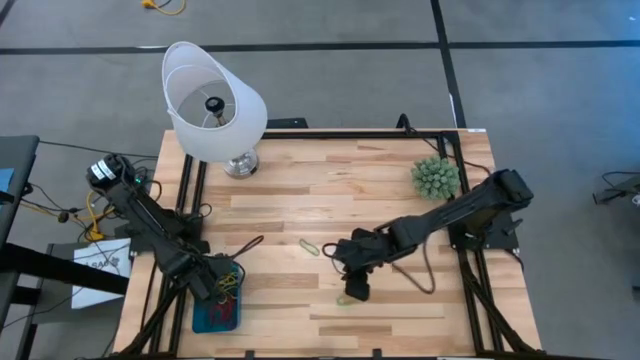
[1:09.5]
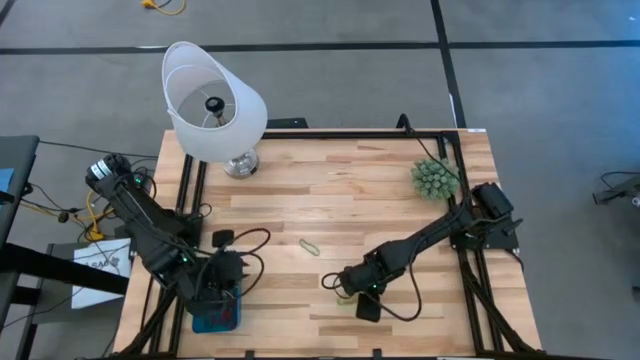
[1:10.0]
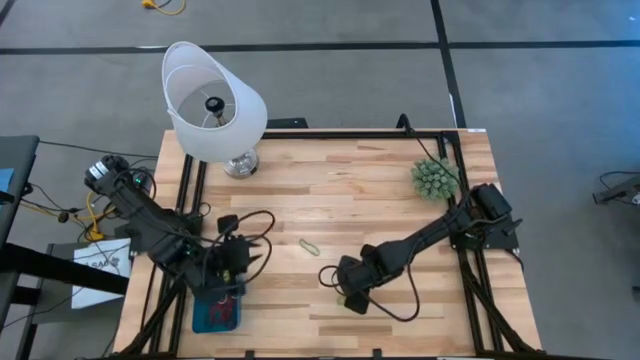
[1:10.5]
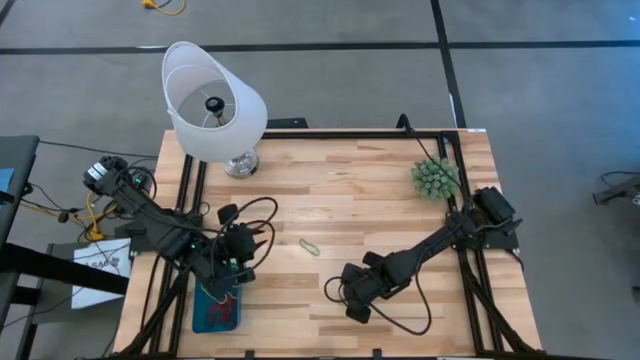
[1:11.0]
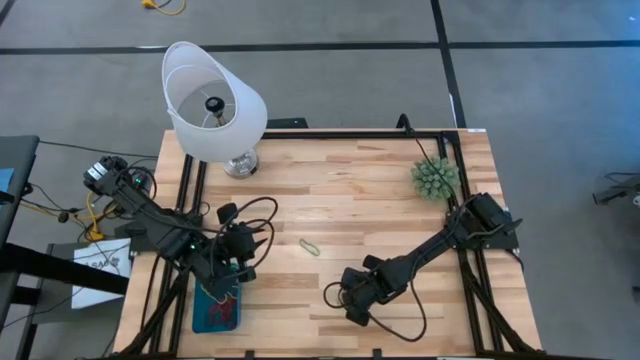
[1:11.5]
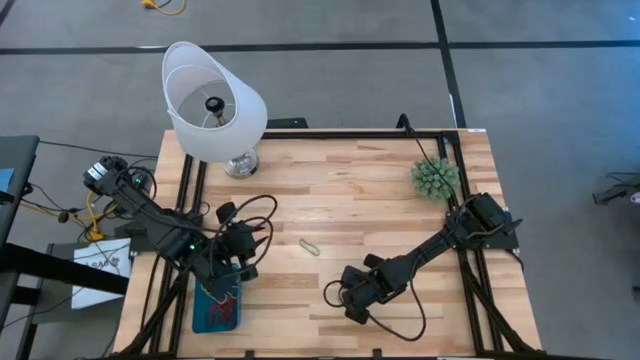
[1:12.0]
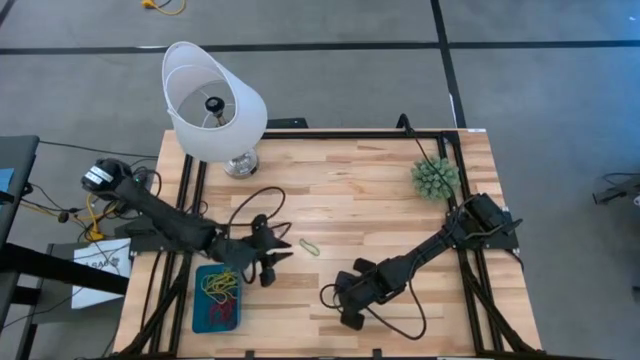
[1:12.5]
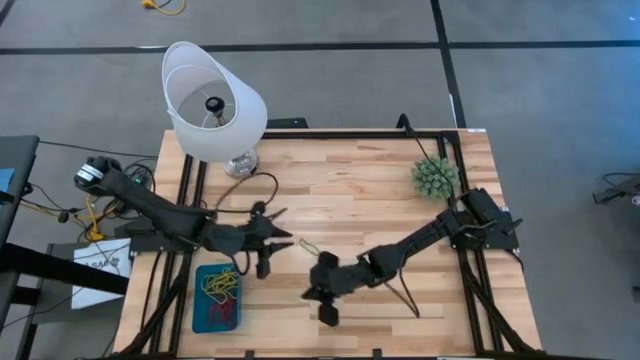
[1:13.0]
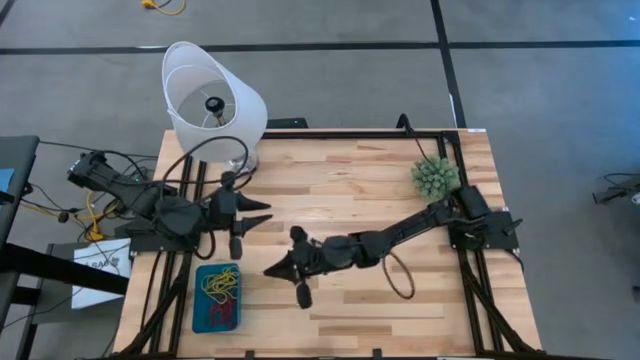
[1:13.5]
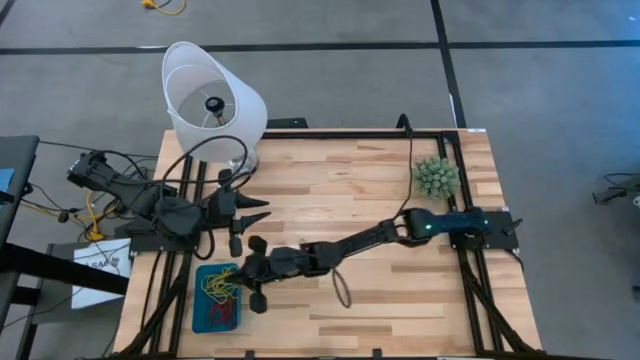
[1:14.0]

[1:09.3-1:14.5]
Task: Pick and place items into bin
Put the green rubber band into the blue bin

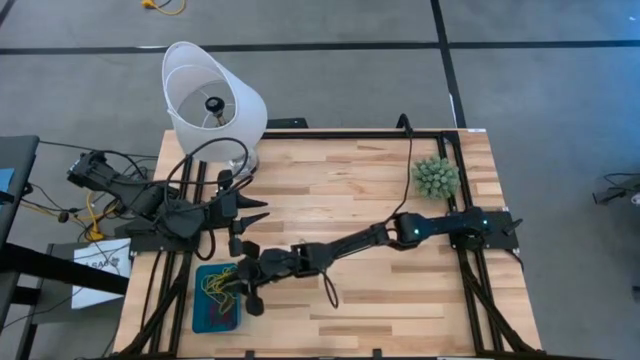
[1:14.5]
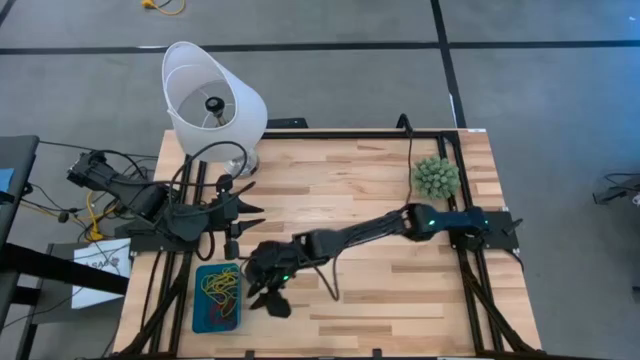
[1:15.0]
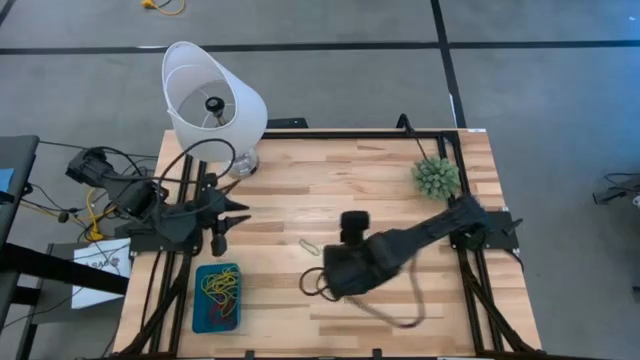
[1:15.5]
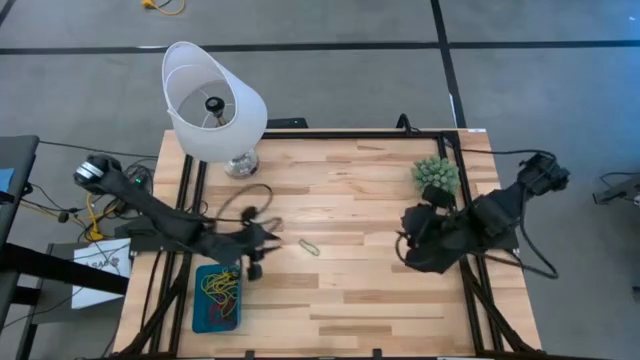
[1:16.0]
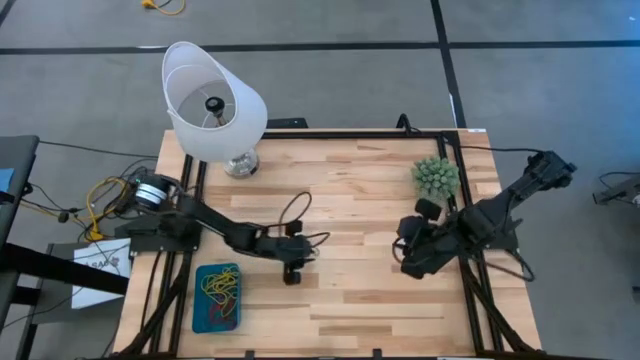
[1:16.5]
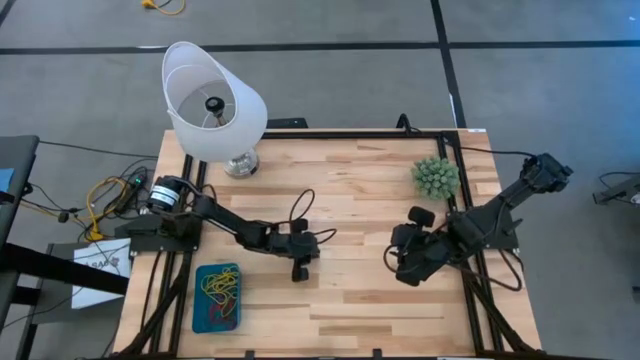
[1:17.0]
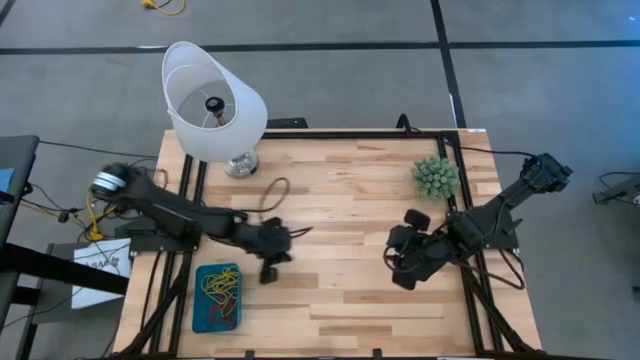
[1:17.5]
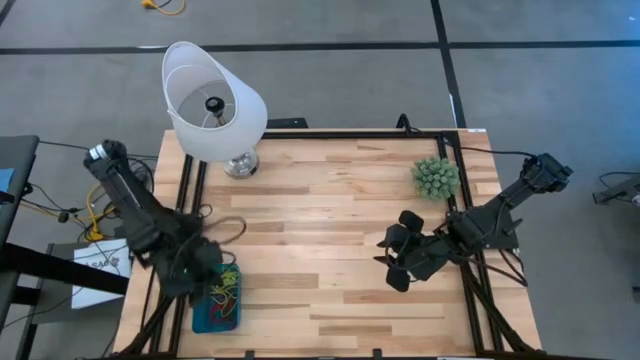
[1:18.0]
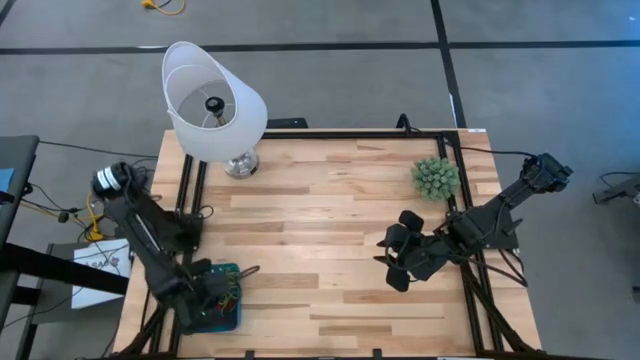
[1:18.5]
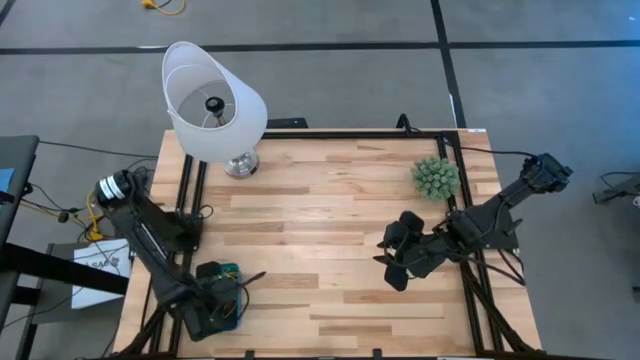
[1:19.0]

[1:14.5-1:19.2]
Put the green rubber band into the blue bin

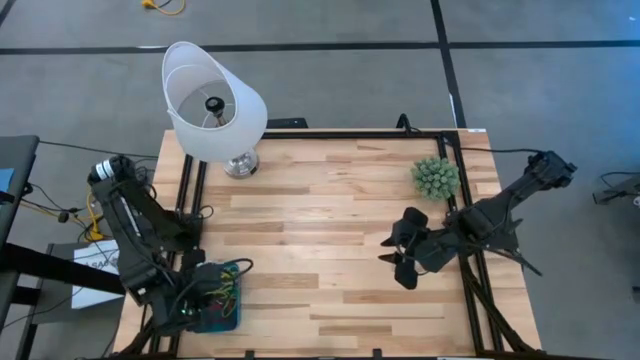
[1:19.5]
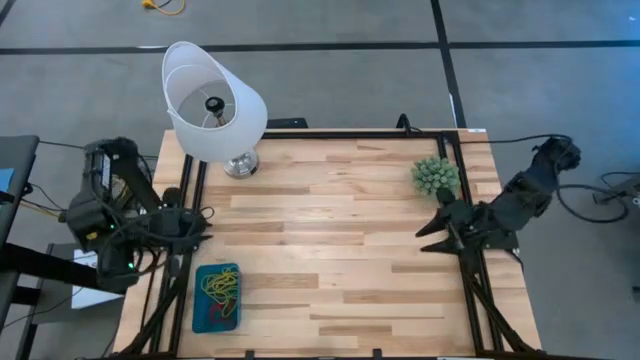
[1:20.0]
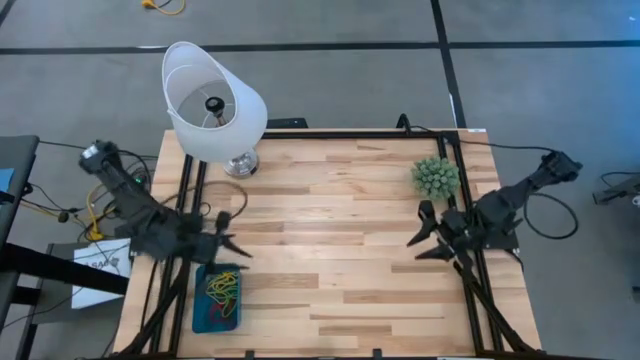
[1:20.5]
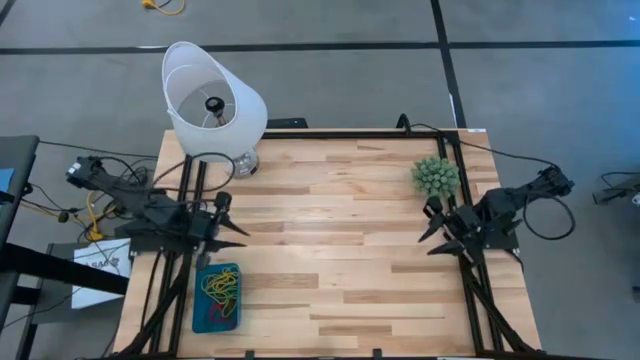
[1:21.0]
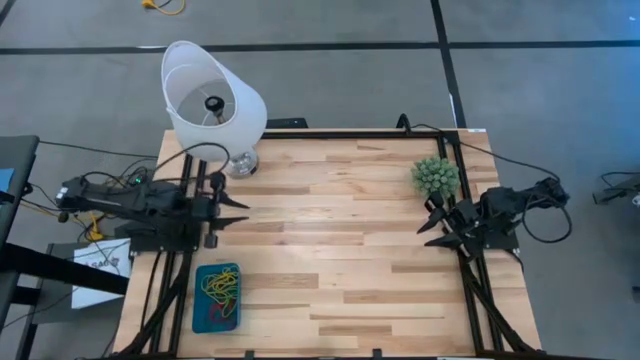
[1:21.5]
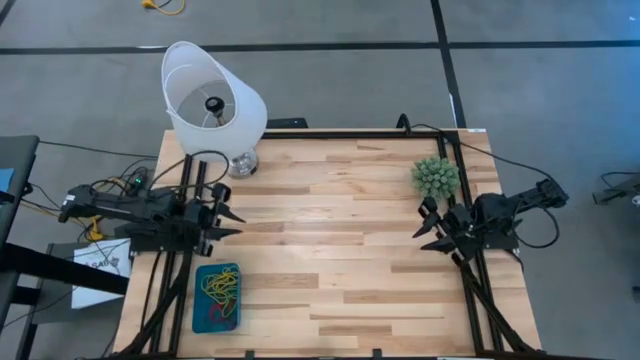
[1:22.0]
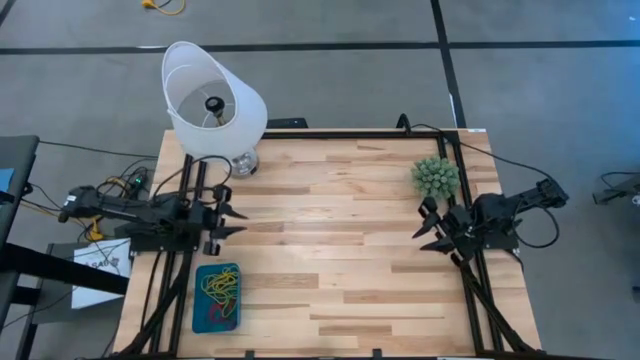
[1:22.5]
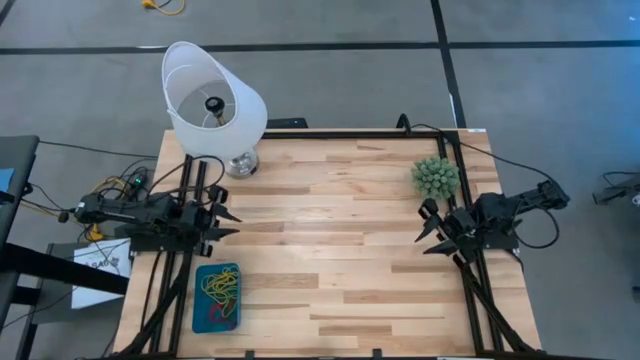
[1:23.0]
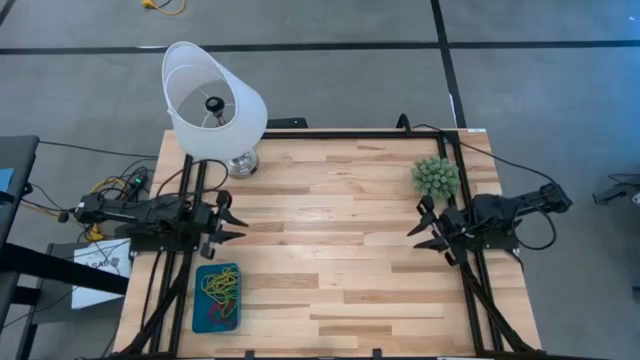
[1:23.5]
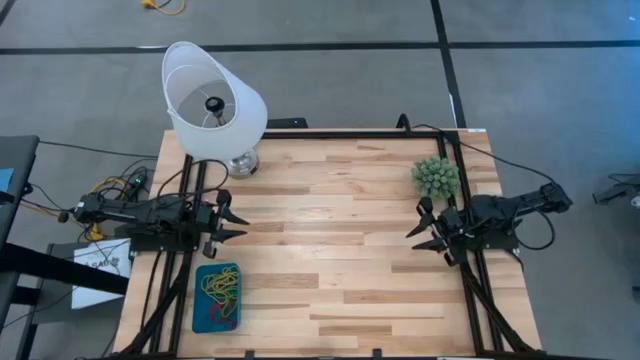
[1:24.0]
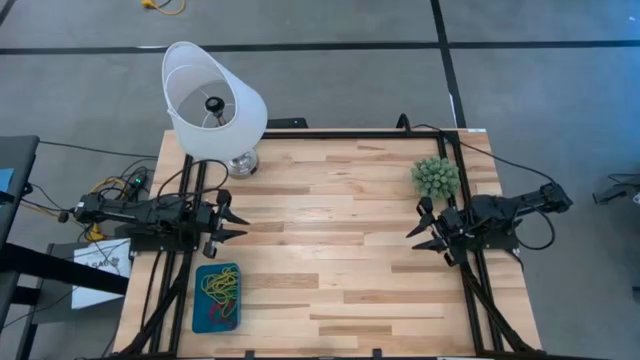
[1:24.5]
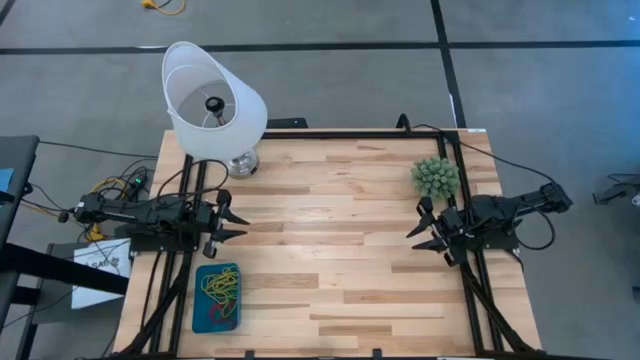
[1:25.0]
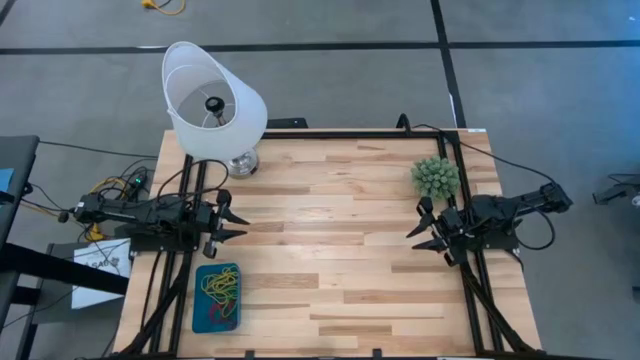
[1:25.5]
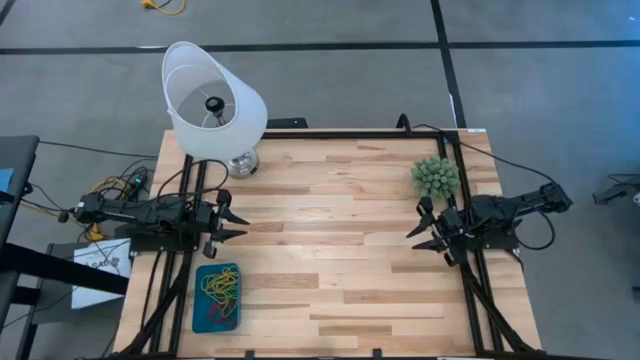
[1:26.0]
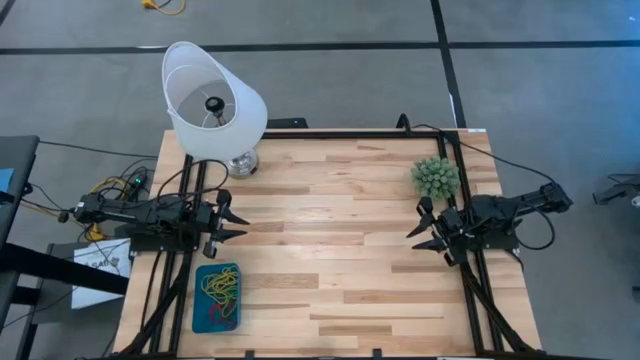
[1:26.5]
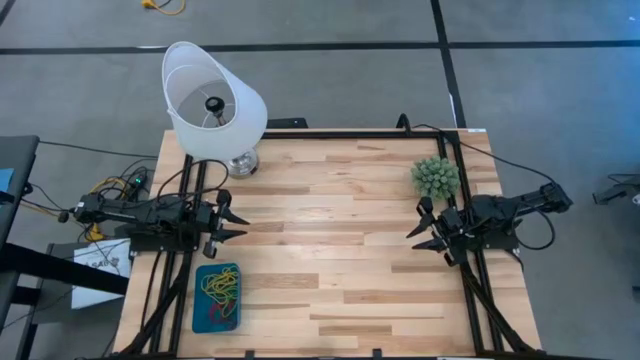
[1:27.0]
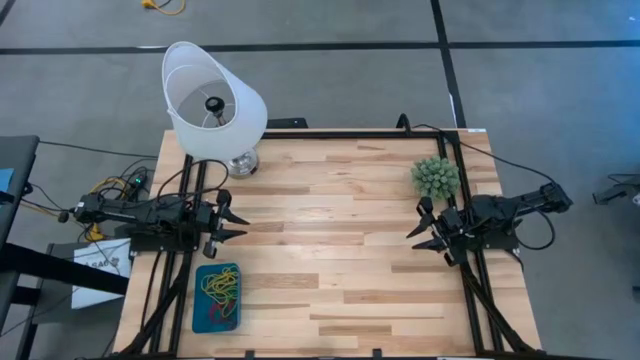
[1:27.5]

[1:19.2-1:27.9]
Return to Home Position

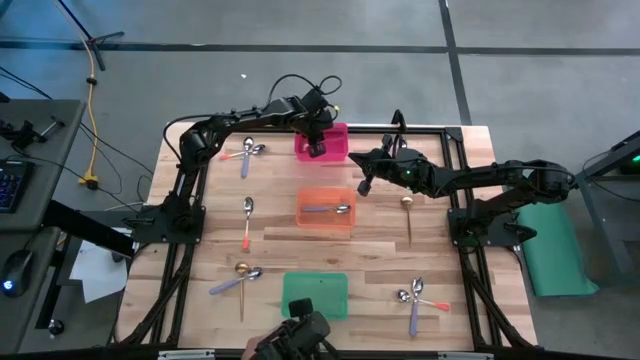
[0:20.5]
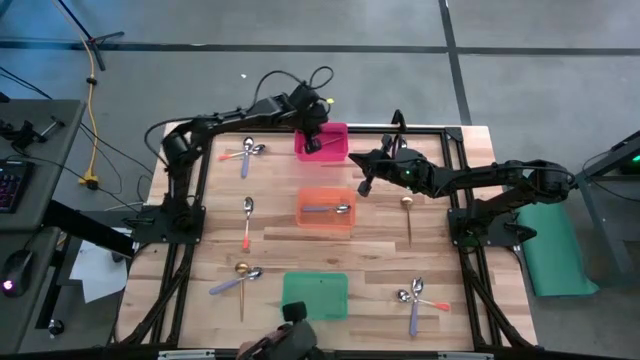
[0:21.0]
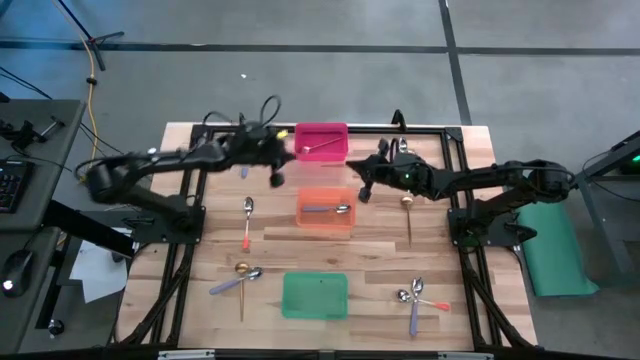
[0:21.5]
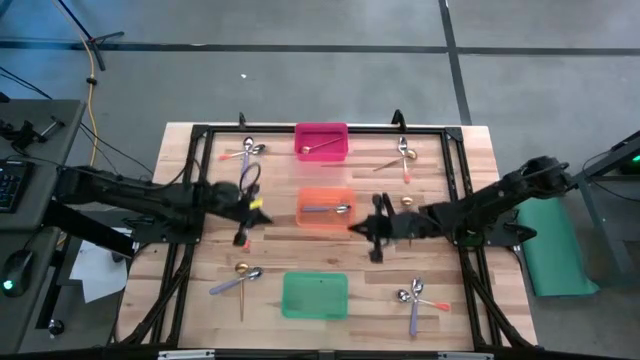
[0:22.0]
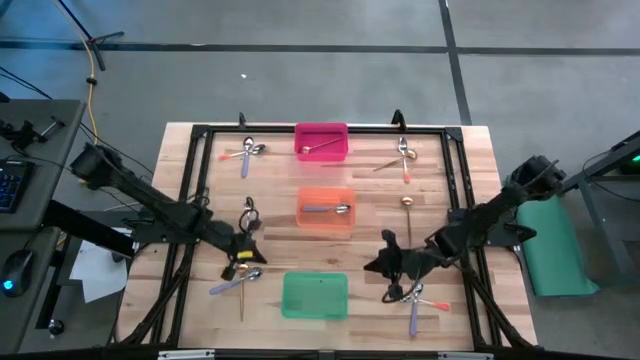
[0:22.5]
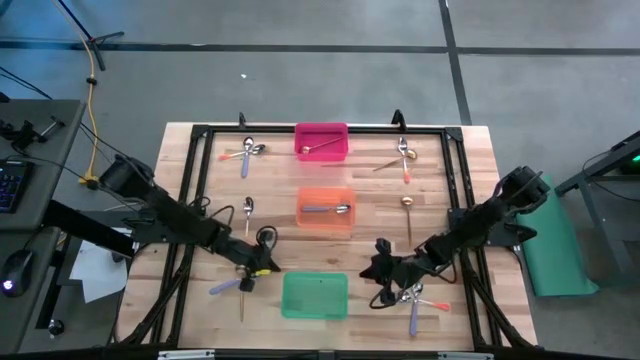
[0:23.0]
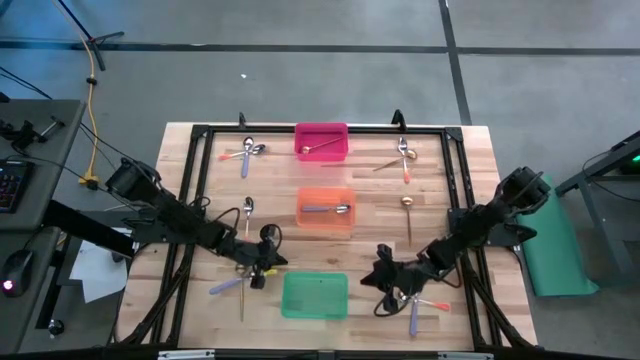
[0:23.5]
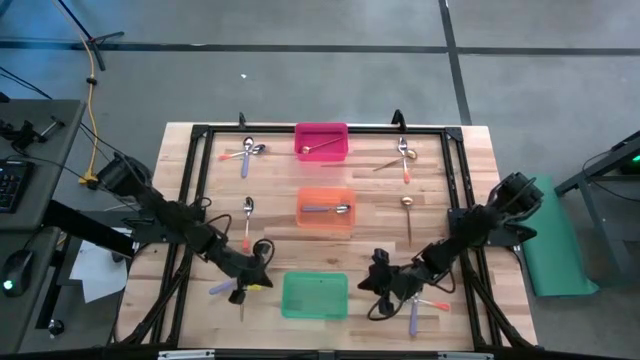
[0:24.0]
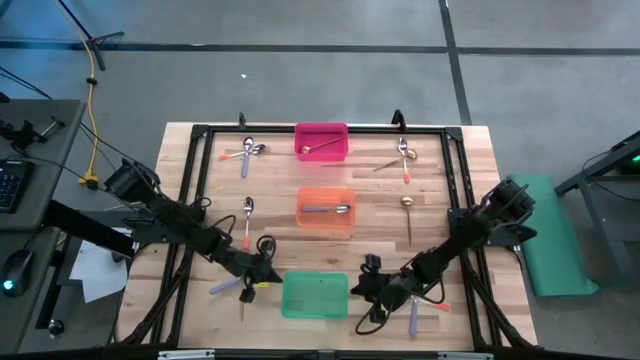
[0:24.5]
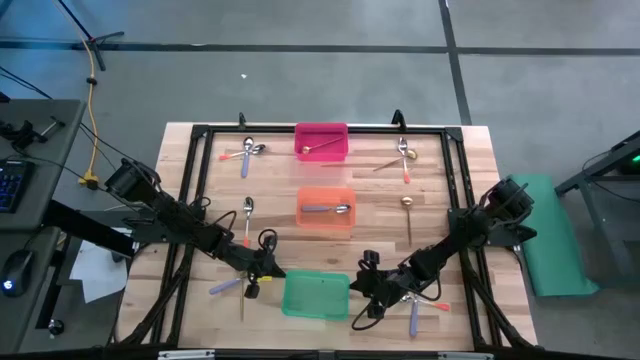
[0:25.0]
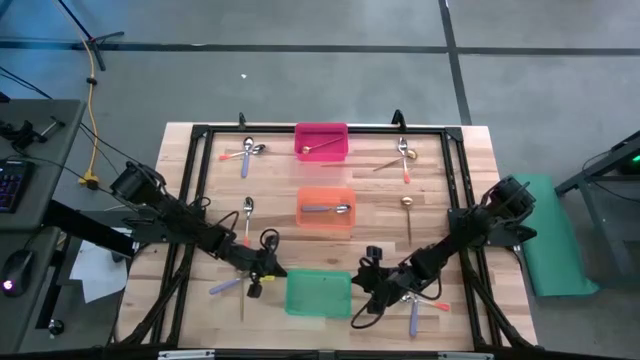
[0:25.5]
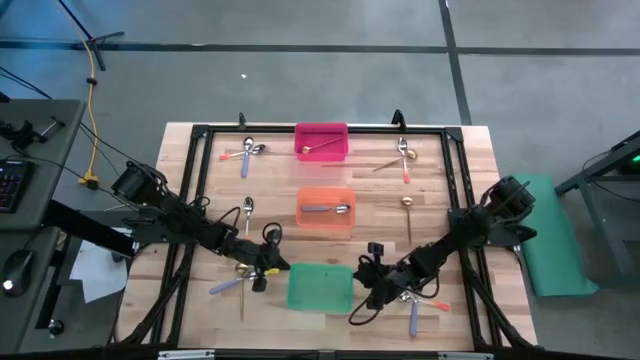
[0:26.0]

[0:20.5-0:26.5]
Task: Sort silverware by color (type)
Adjust the green bin on the table
